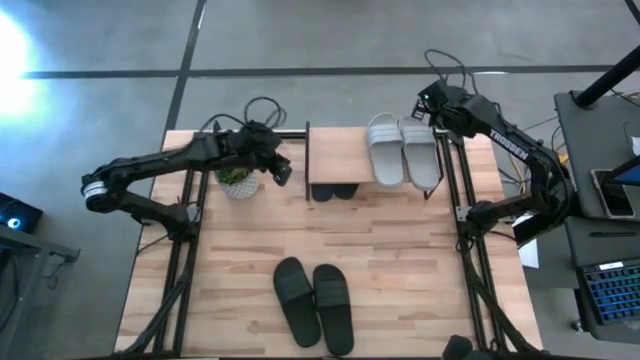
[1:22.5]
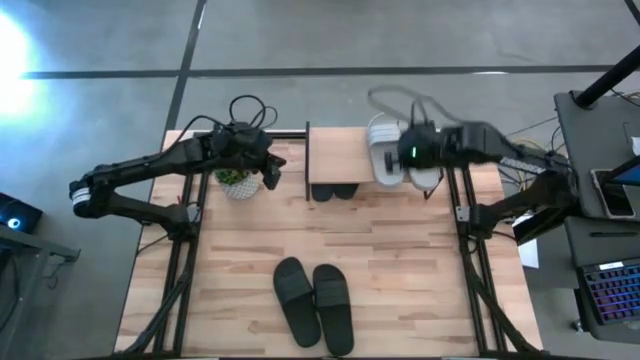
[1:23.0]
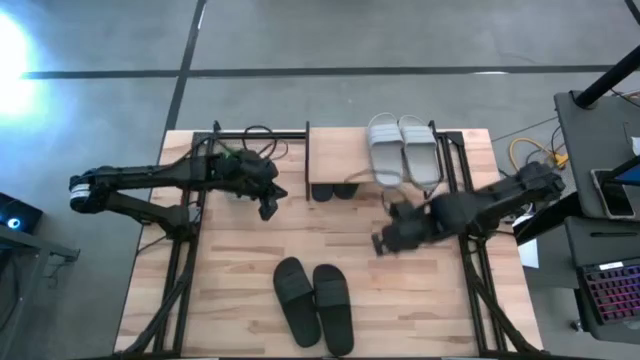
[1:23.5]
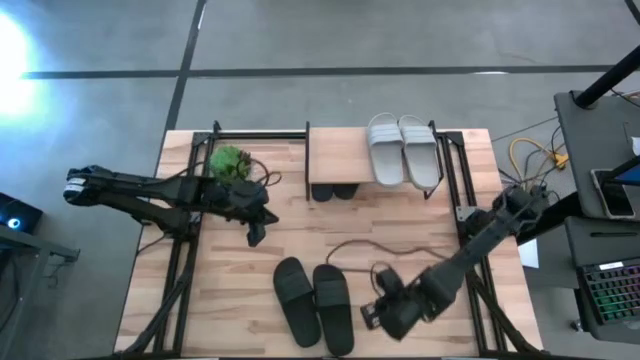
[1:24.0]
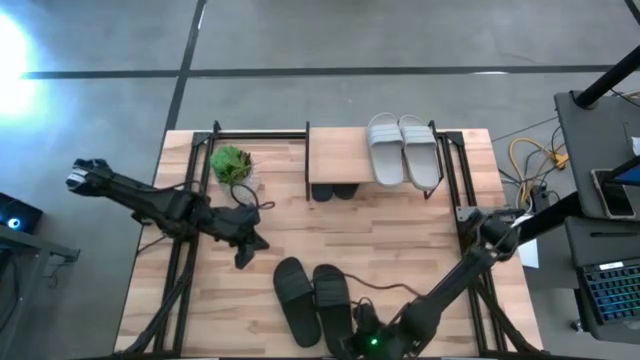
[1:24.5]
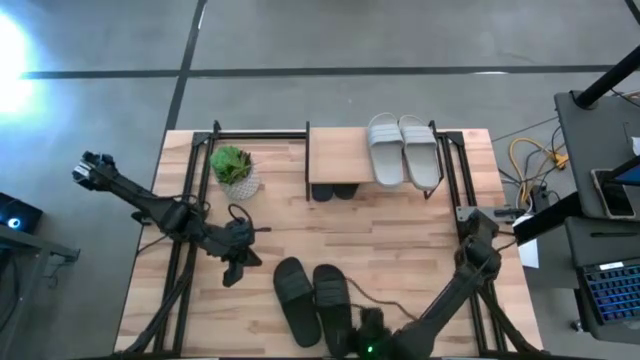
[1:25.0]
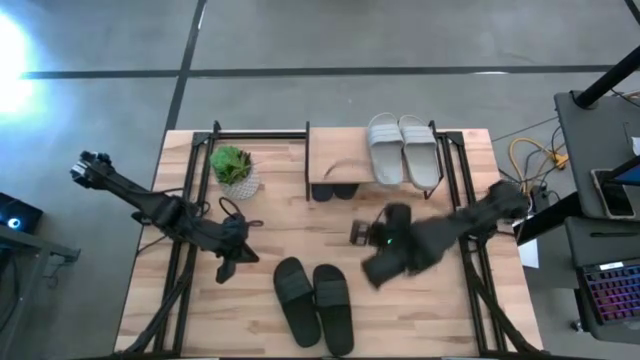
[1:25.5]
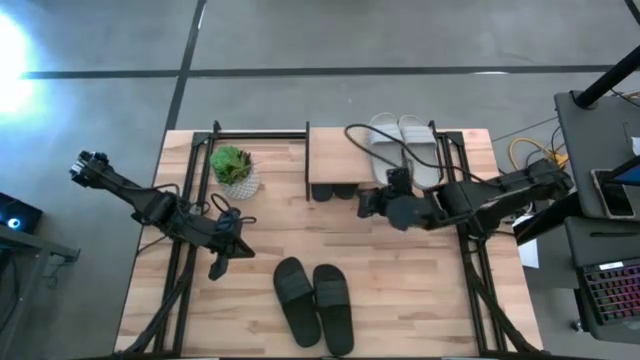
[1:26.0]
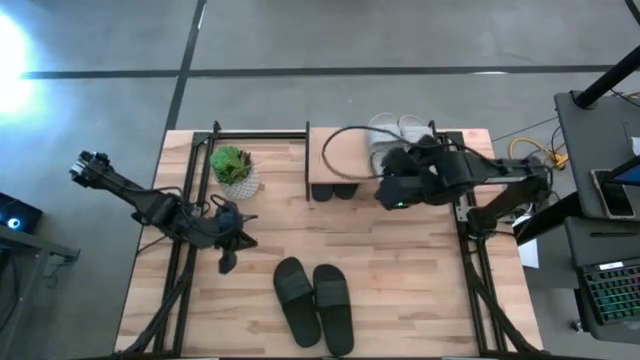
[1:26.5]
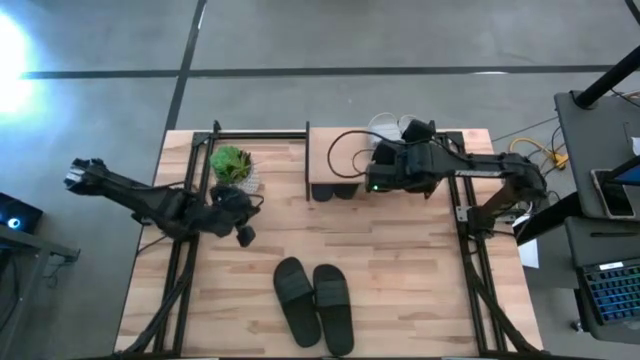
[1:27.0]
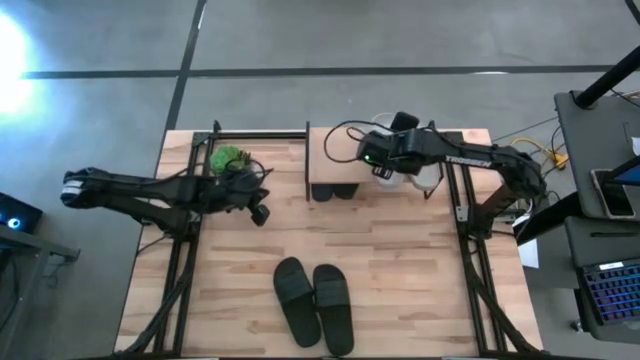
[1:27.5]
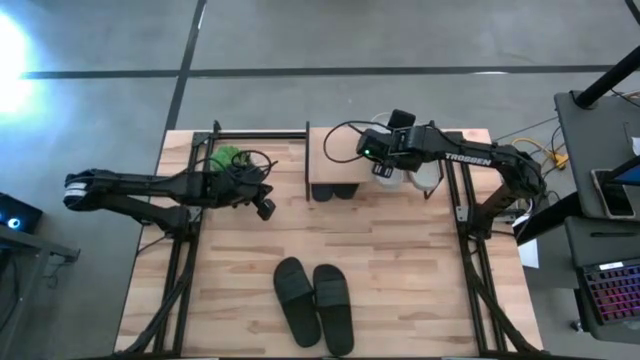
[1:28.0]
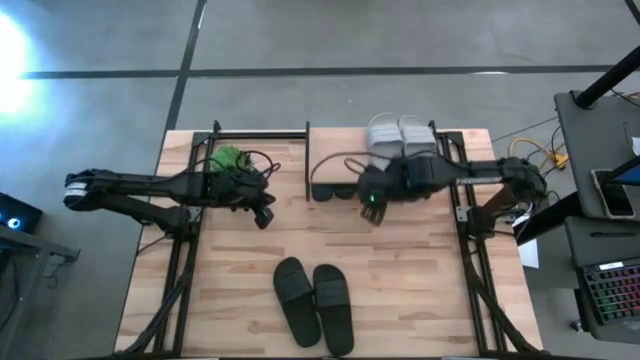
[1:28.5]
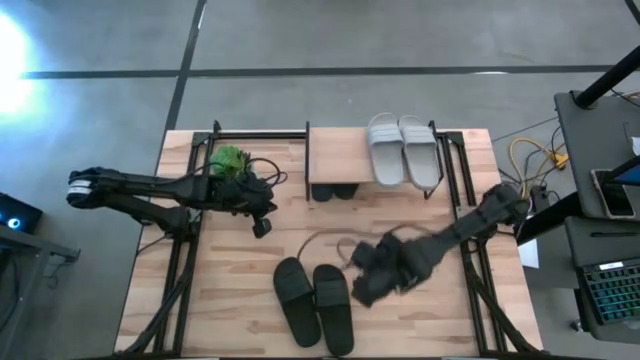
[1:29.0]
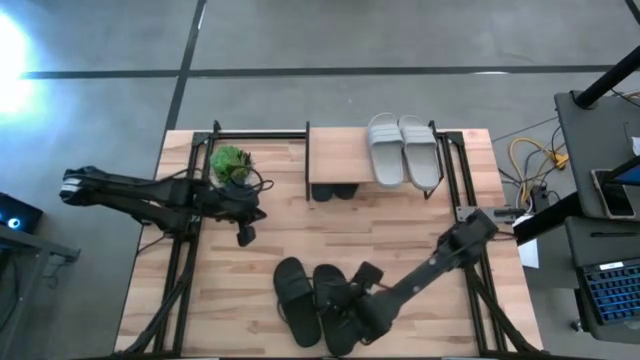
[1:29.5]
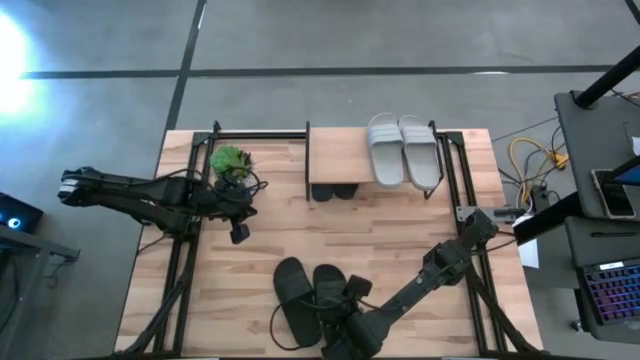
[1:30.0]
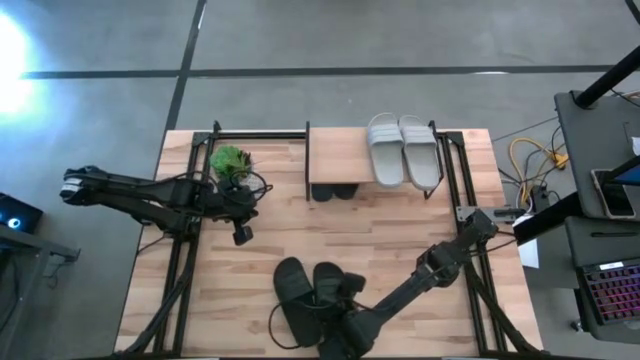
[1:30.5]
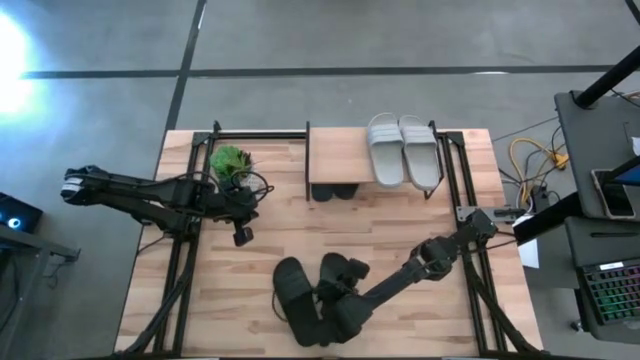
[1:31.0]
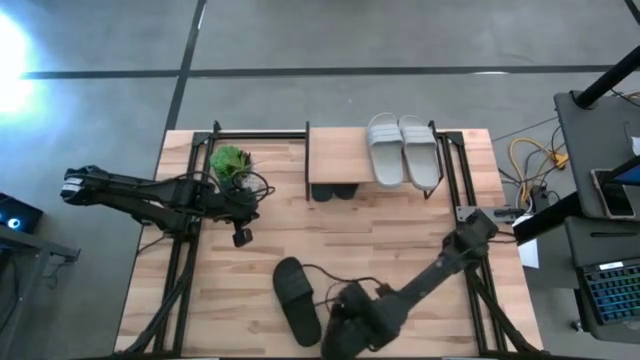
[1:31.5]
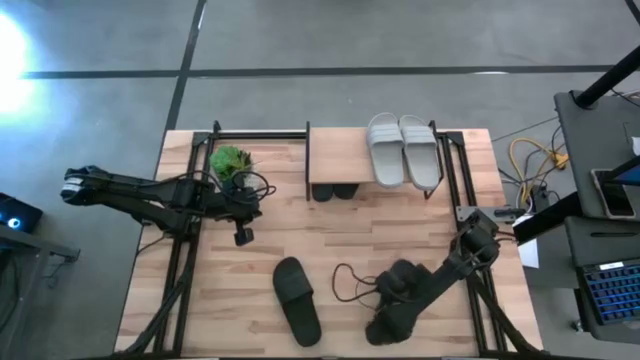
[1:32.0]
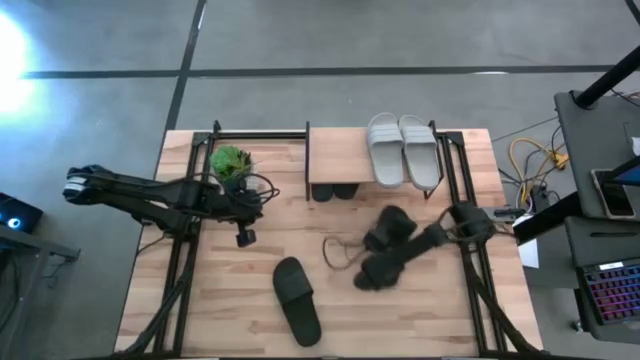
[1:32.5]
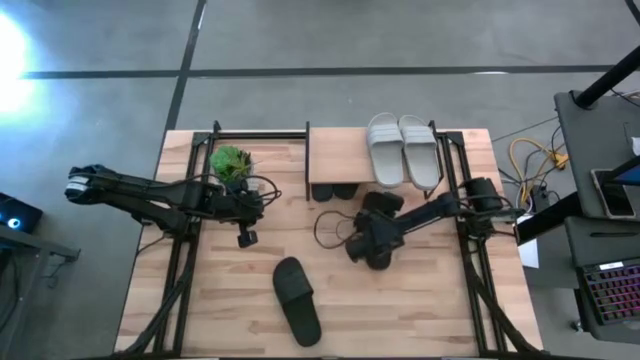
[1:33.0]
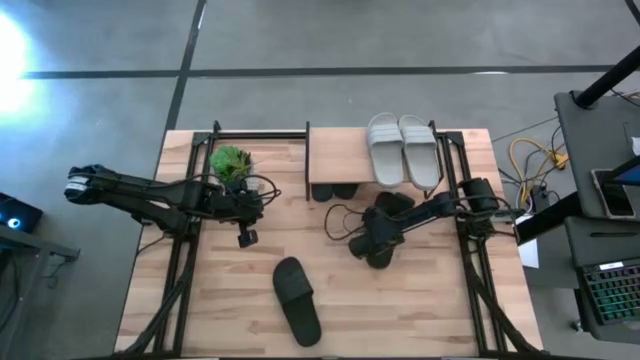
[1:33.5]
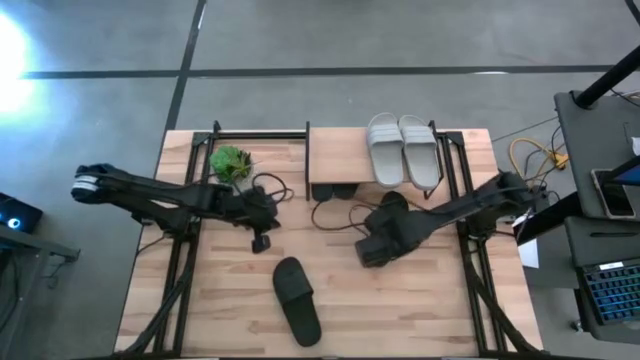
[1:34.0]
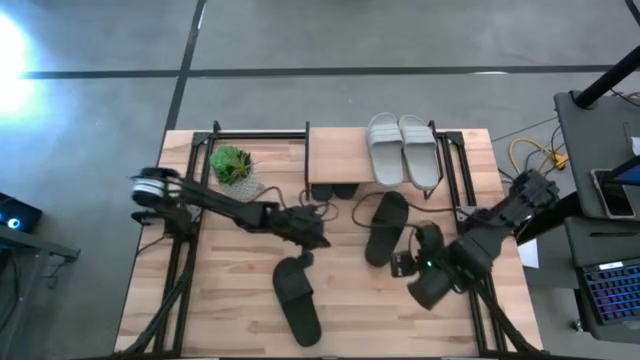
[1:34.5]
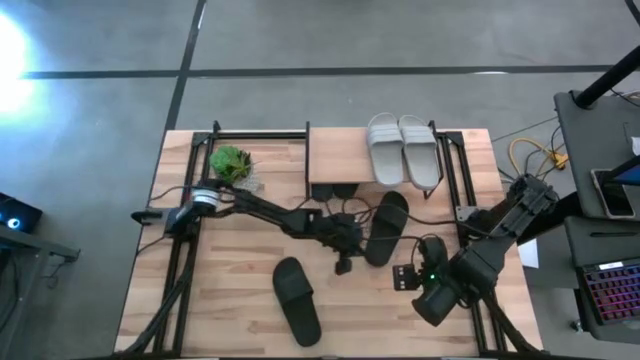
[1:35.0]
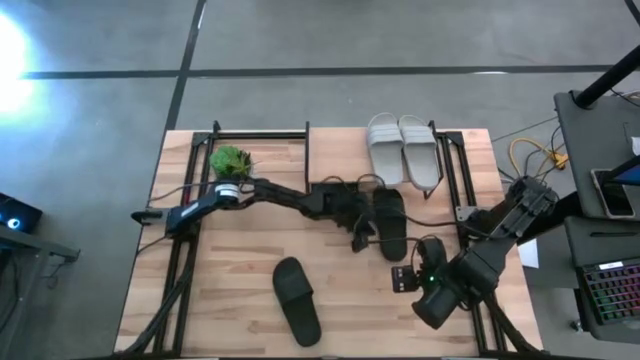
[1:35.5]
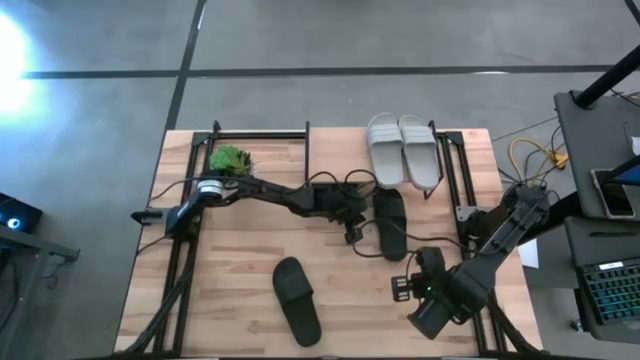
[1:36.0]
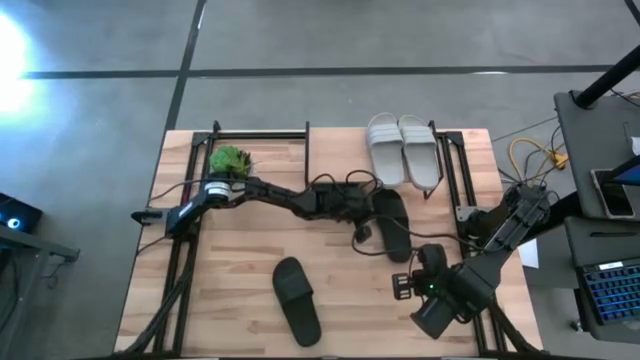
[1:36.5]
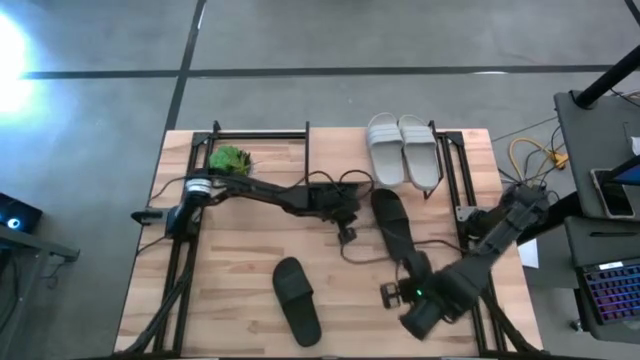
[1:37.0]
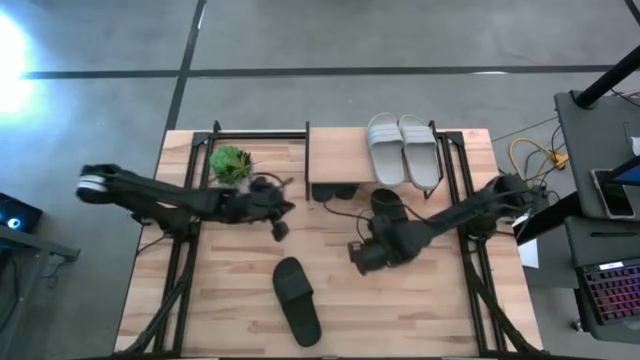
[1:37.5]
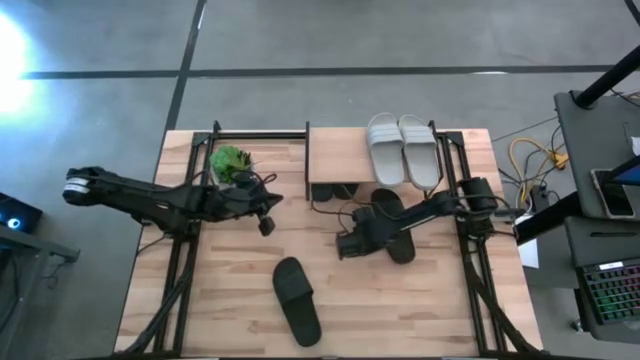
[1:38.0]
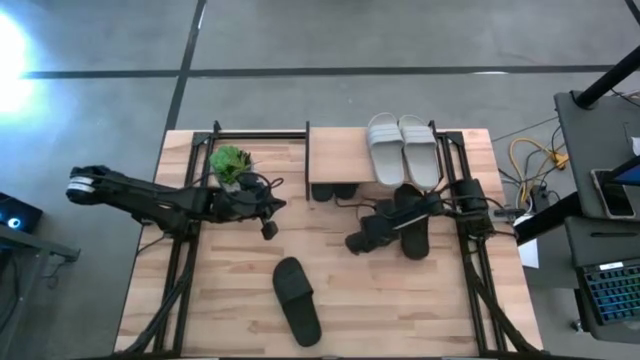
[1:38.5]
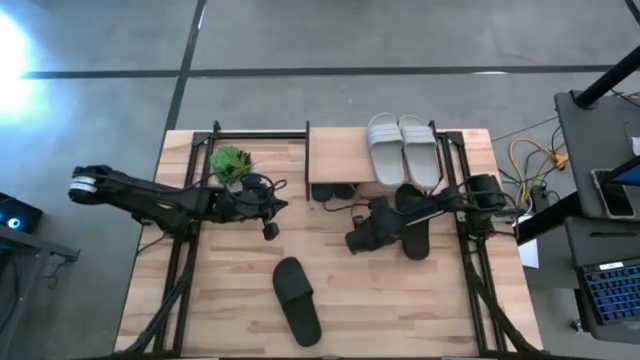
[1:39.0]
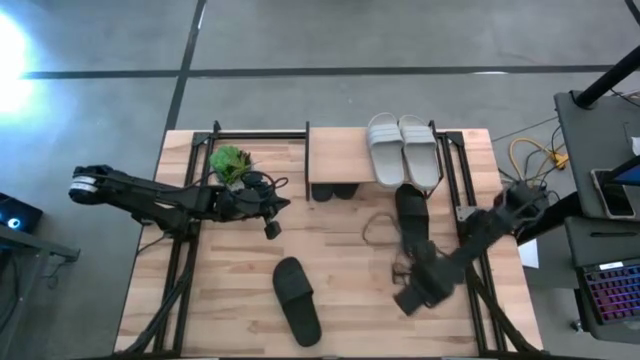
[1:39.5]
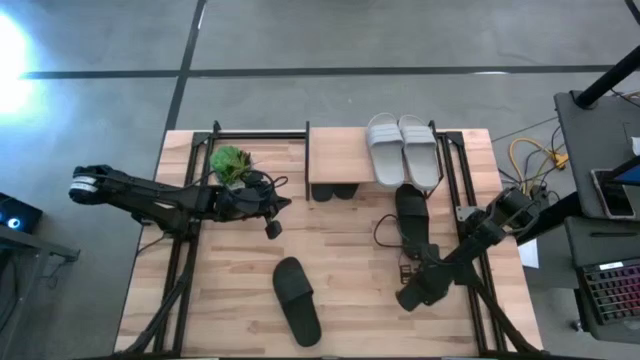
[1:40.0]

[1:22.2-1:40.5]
Task: Pick and place slides into the shelf
Put the black slipper under the shelf

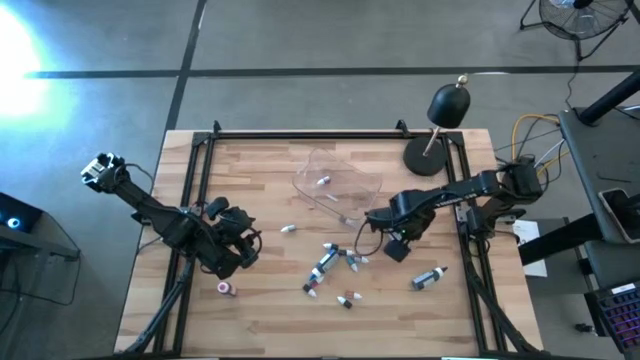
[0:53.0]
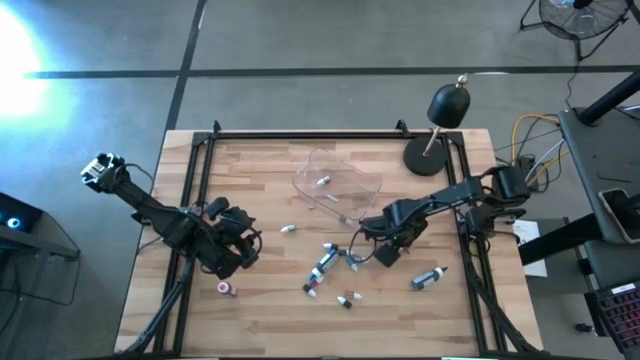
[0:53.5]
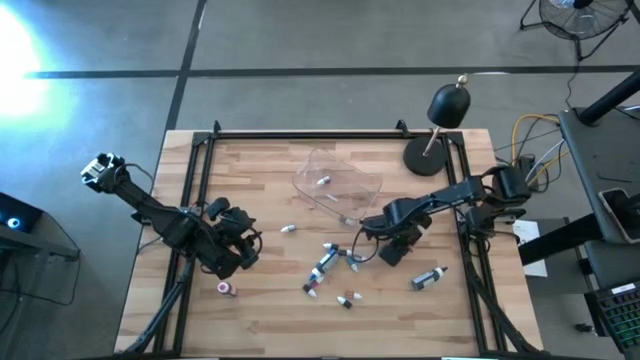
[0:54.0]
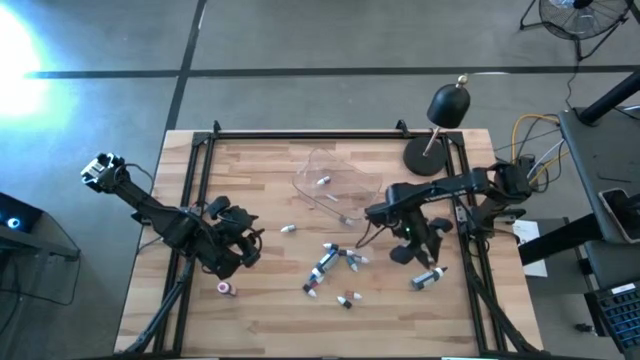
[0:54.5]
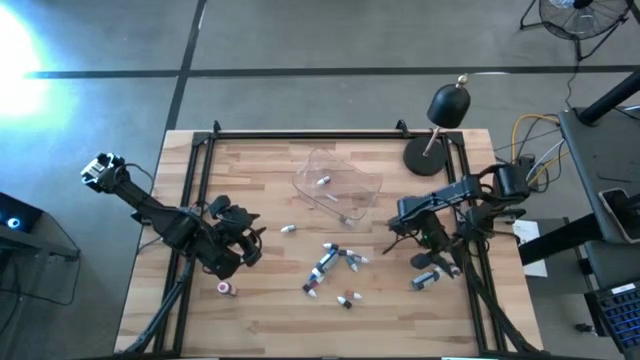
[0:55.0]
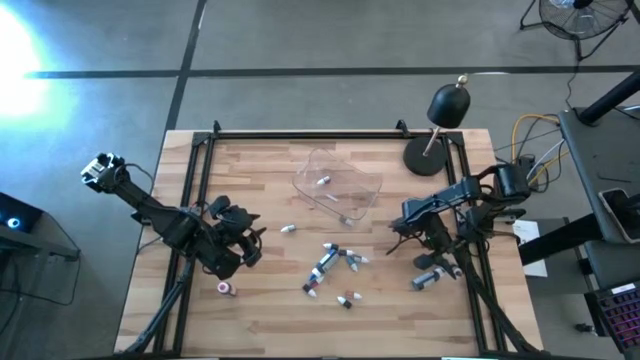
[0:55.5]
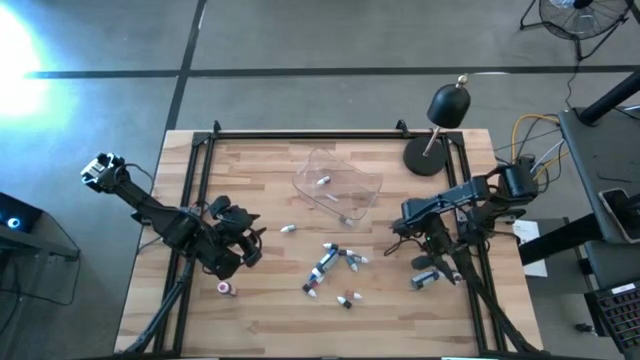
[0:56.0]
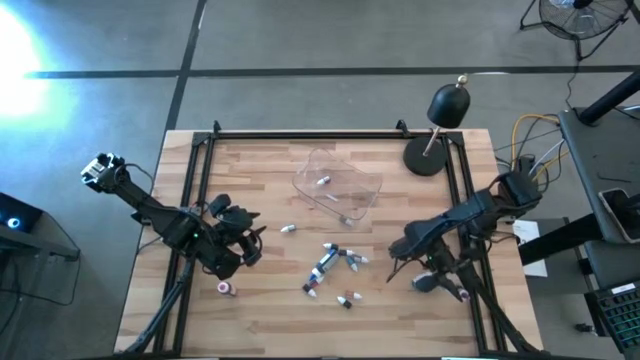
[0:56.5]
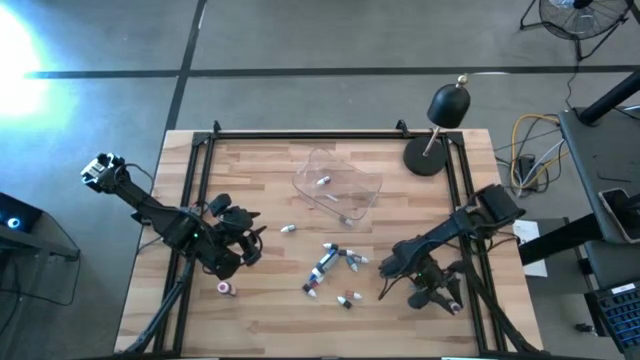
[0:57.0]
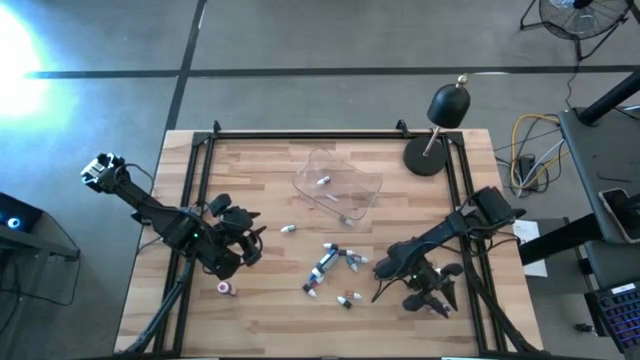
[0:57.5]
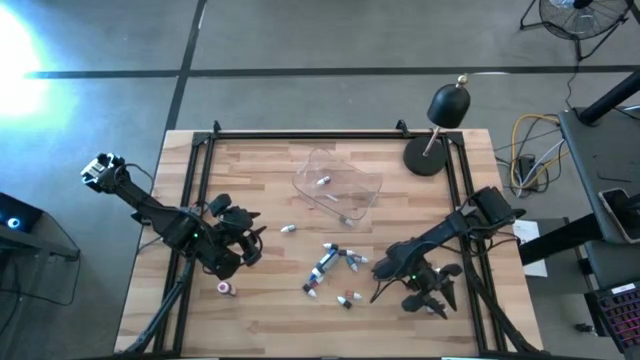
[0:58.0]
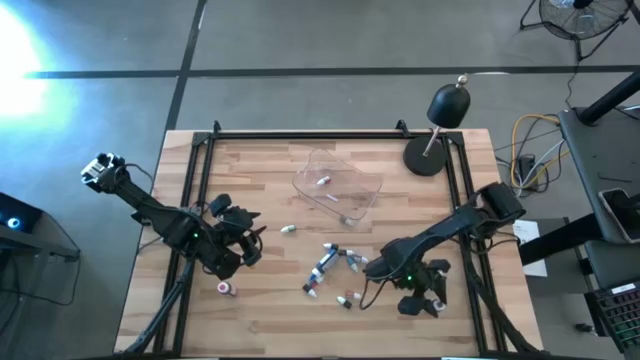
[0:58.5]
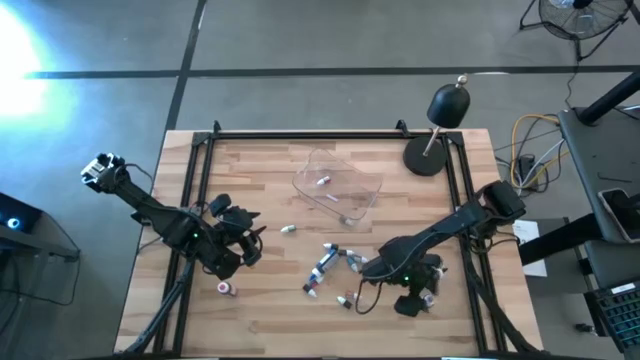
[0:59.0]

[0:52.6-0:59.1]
Task: Pick & Place food coloring
Adjust the large purple food coloring bottle
